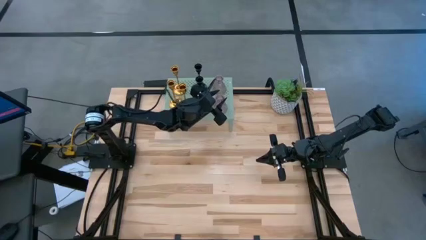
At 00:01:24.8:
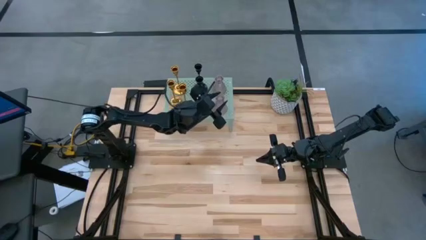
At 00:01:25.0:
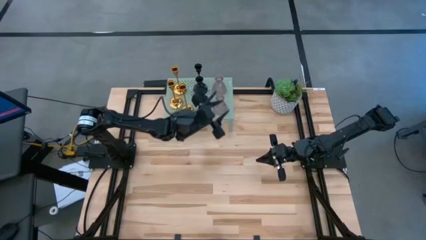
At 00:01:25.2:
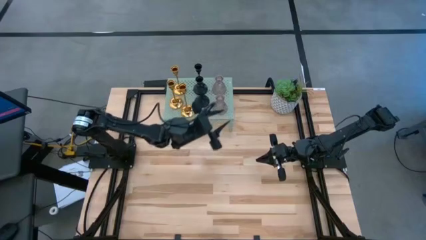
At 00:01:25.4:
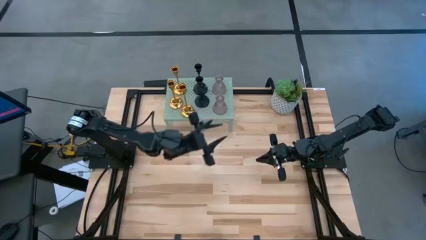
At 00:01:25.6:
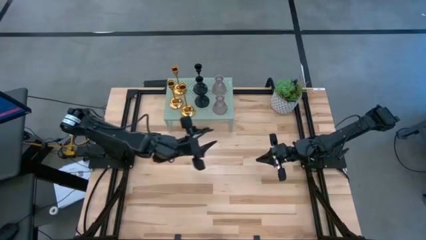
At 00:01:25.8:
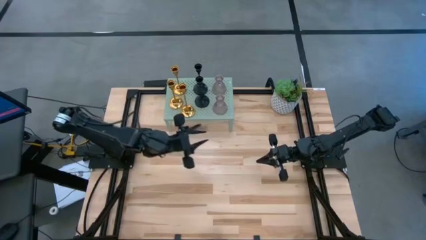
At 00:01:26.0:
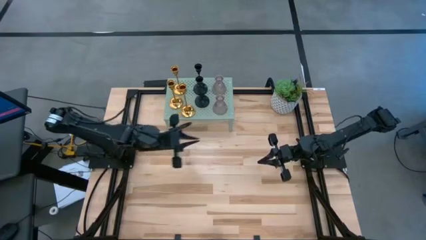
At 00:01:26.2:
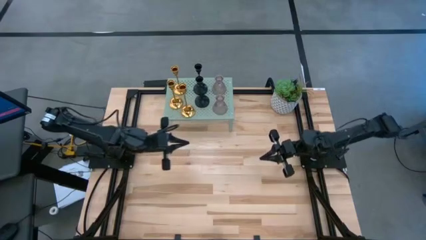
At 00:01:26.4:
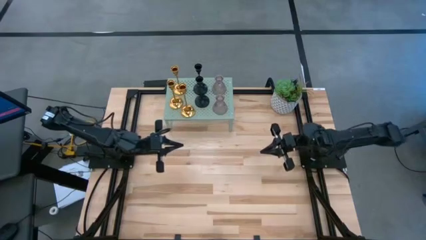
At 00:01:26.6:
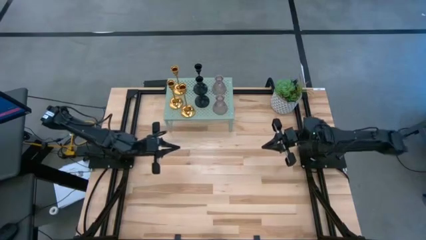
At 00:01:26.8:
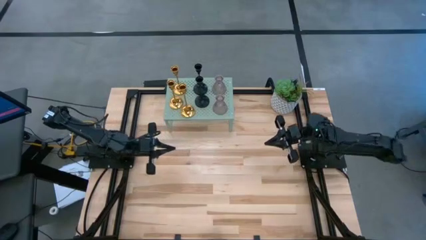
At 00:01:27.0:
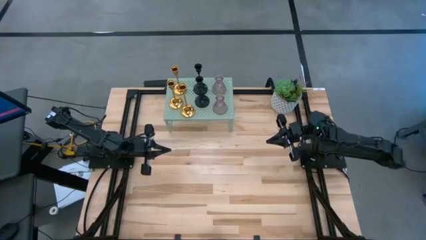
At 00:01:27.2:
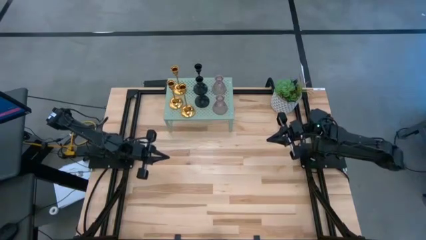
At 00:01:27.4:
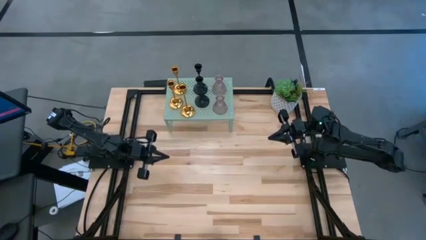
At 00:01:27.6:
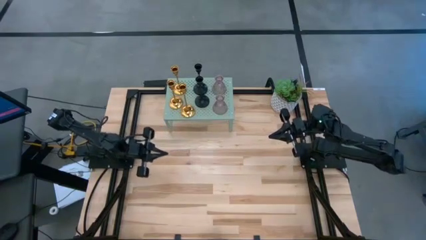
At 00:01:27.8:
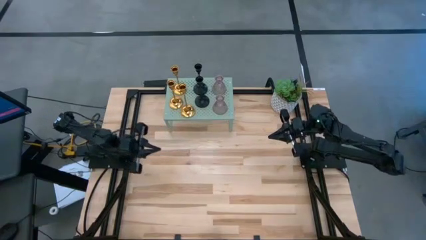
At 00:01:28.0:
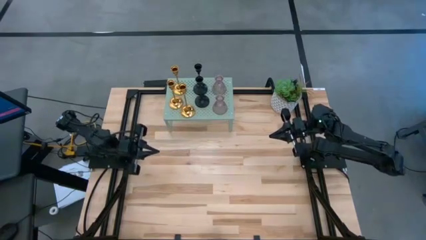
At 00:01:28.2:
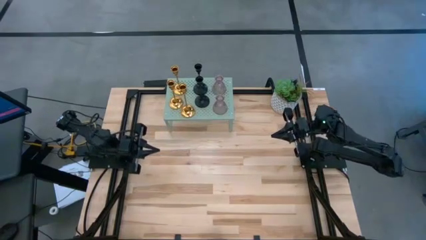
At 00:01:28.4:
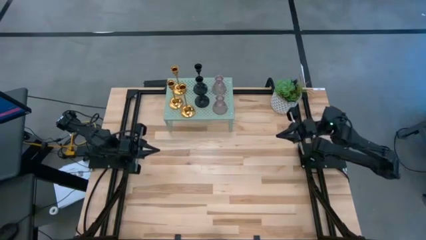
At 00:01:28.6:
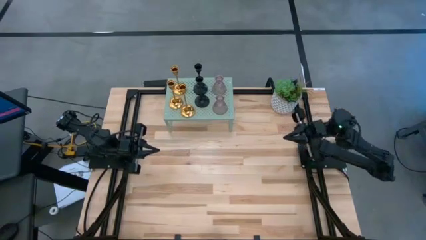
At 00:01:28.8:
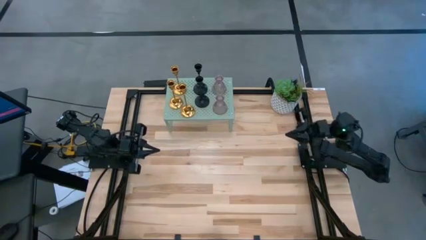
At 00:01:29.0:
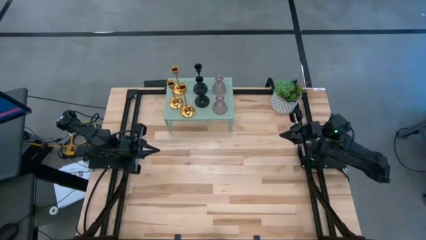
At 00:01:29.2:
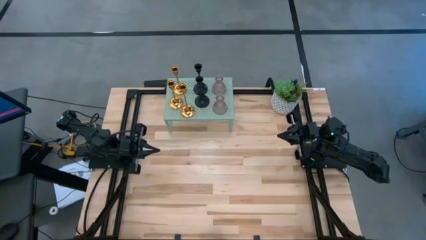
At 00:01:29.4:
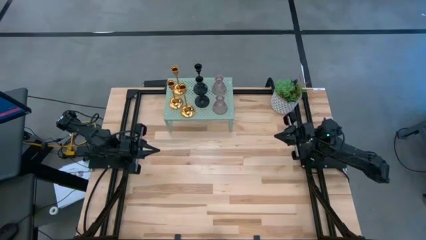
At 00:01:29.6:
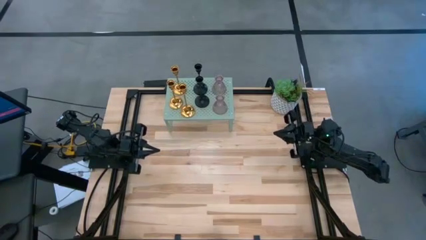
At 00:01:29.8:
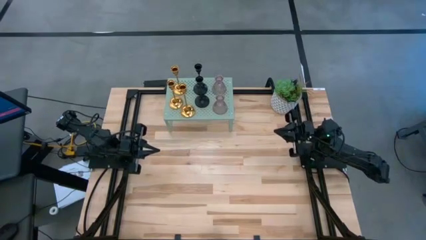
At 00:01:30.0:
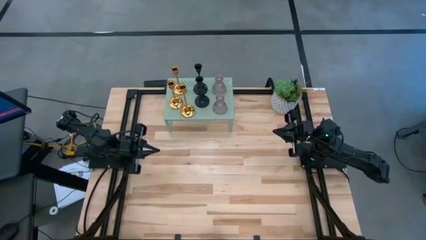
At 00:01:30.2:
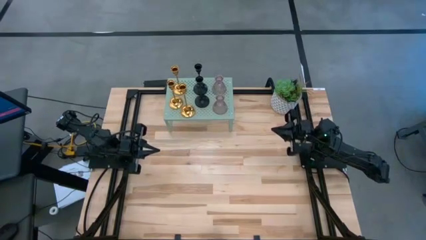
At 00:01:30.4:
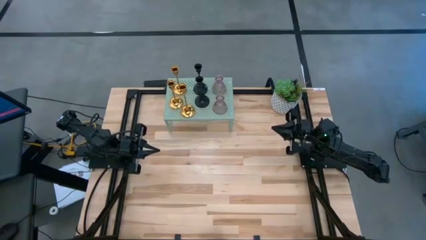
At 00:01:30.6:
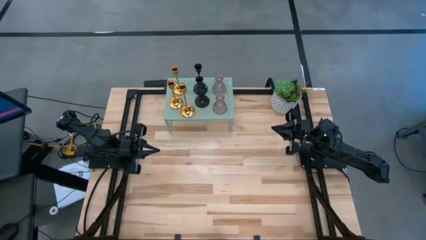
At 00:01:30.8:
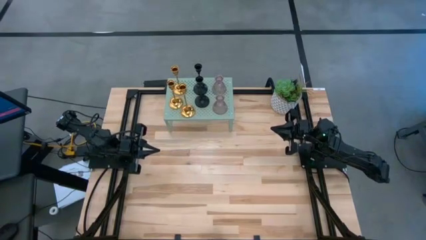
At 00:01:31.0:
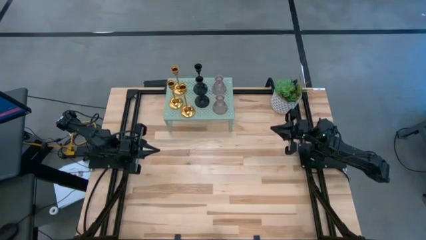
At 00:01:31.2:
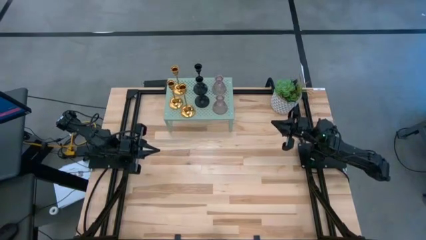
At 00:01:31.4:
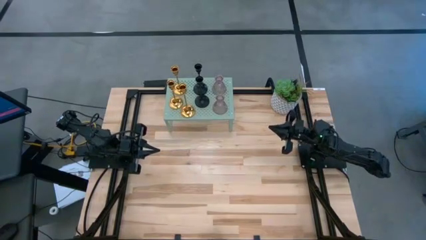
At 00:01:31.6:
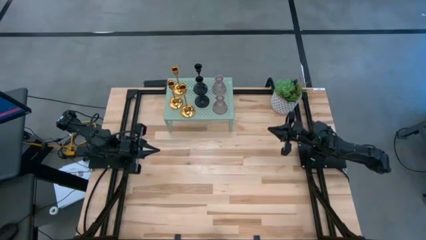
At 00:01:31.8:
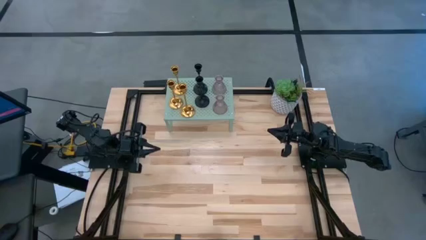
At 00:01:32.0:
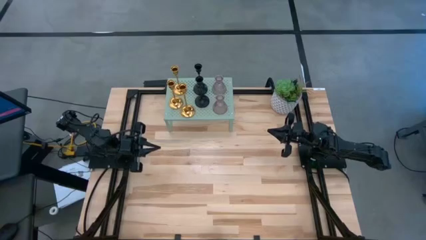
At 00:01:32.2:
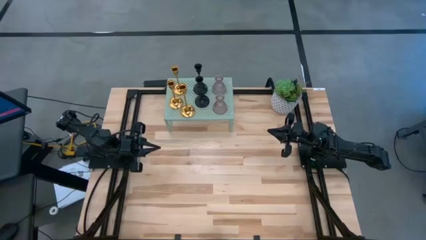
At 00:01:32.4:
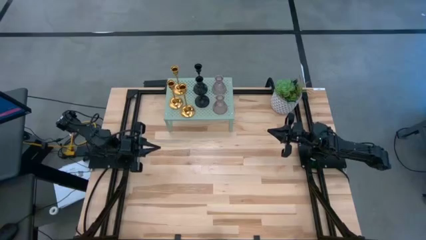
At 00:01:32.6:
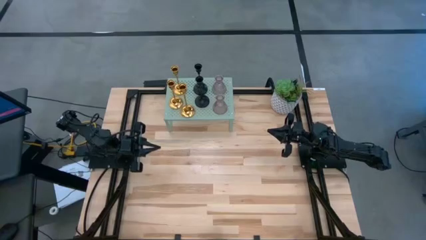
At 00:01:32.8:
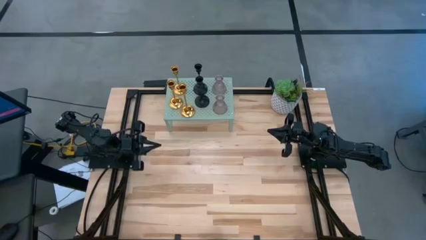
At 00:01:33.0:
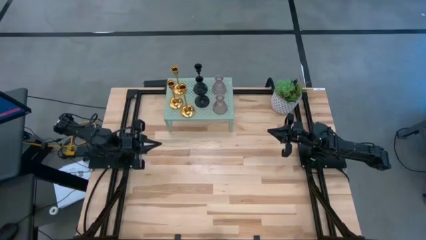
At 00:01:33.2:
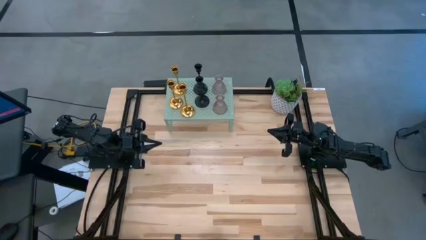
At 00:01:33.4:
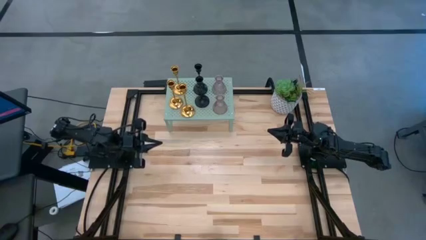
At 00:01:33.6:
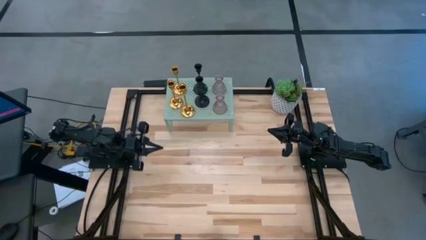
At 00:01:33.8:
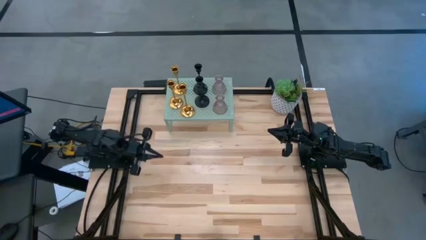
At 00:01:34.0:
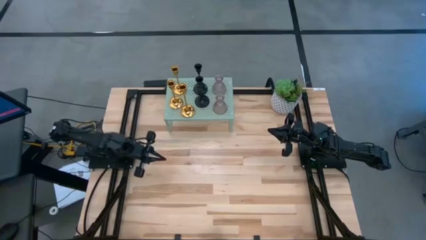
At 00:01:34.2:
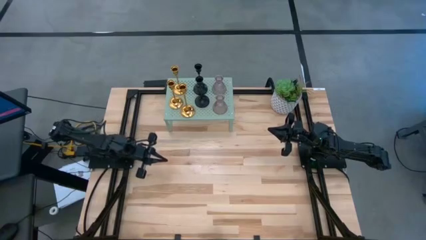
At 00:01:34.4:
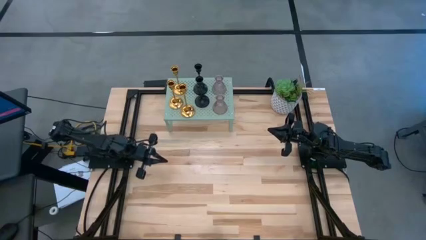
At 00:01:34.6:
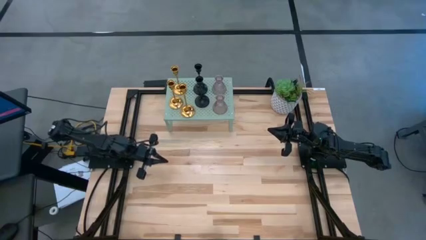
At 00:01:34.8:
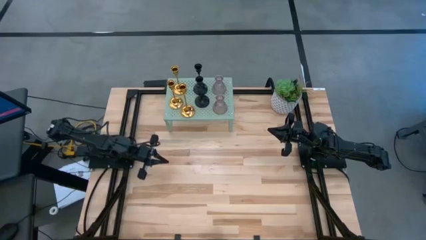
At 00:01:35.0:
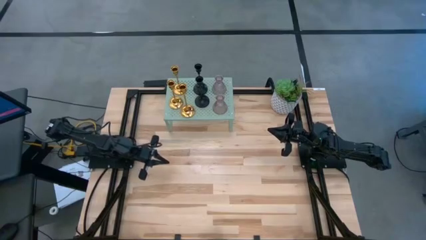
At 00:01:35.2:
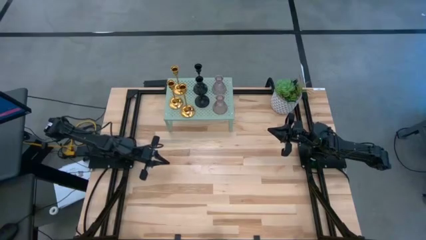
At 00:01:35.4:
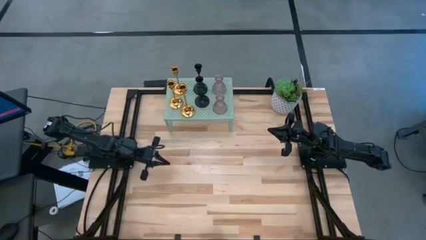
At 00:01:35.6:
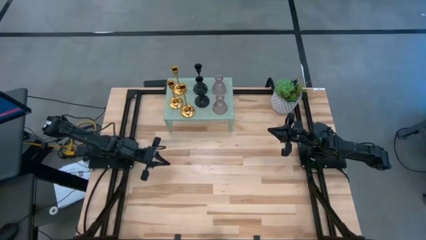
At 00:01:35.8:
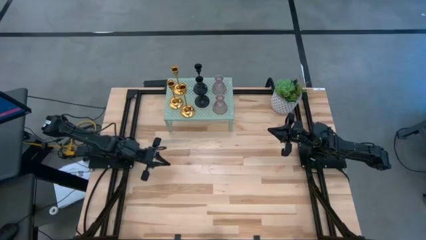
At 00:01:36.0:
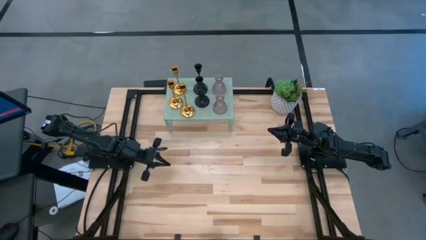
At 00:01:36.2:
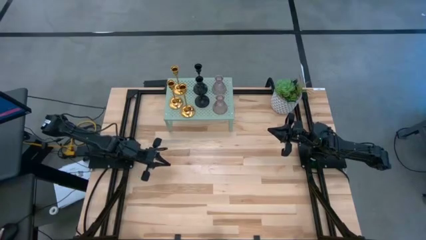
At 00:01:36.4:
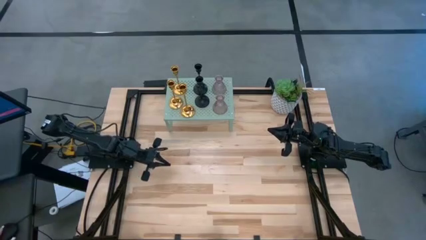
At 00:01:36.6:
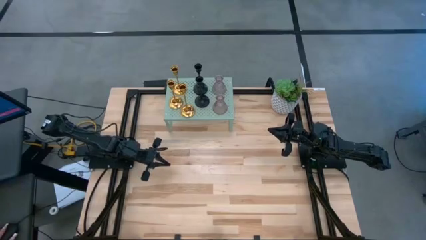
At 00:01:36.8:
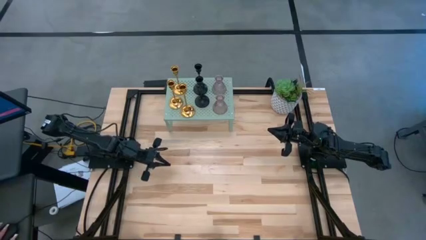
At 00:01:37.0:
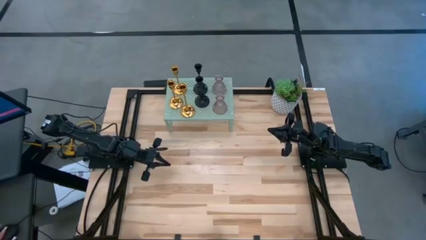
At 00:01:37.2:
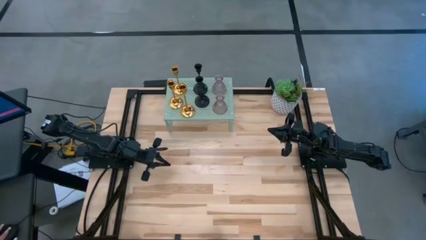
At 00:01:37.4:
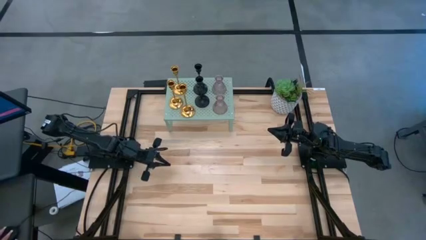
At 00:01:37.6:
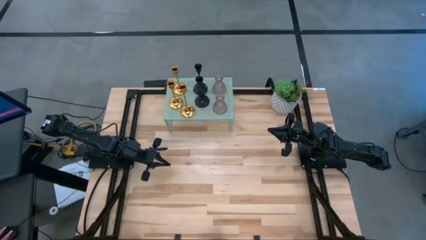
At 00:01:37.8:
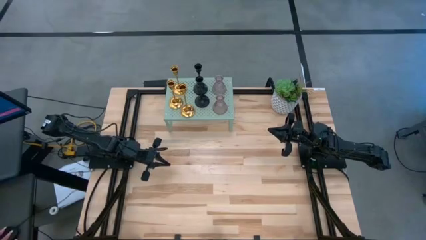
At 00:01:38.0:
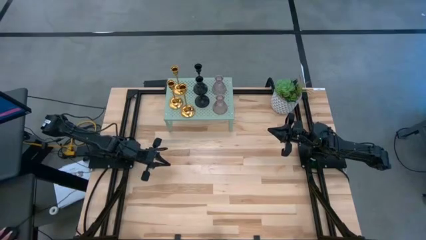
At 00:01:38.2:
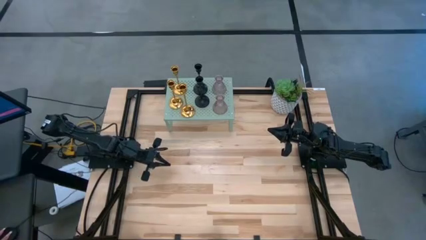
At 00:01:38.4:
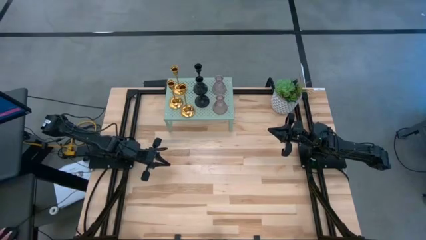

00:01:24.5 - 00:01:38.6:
Task: Pick & Place candle stick holders
Return to Home Position
